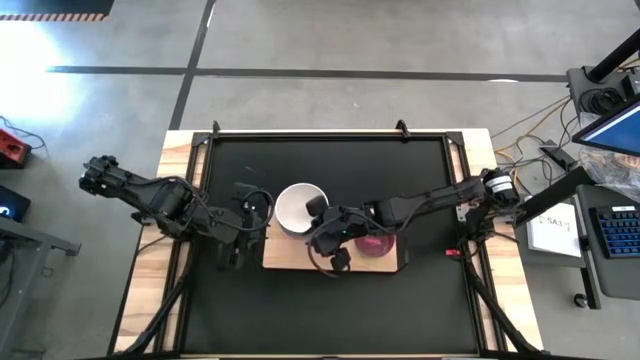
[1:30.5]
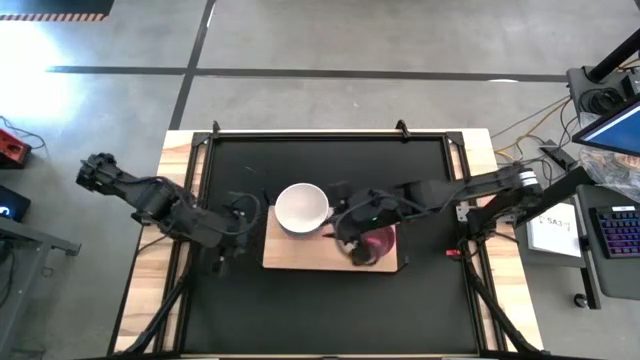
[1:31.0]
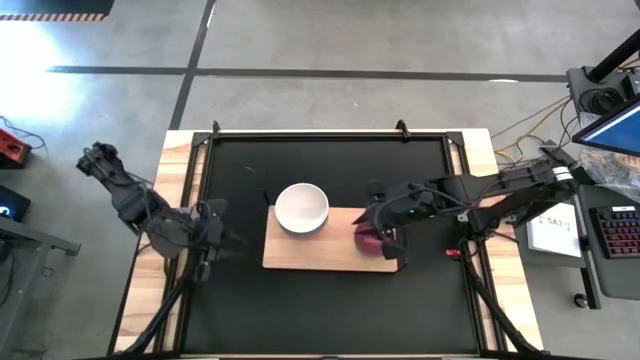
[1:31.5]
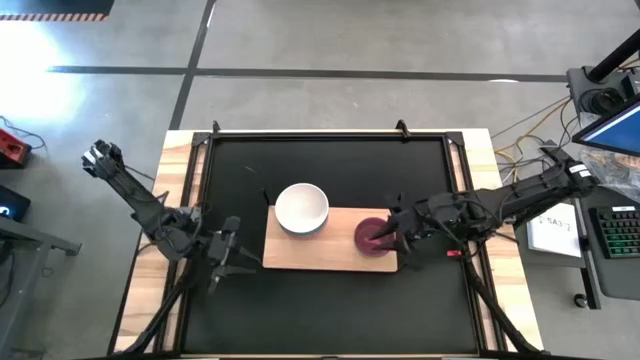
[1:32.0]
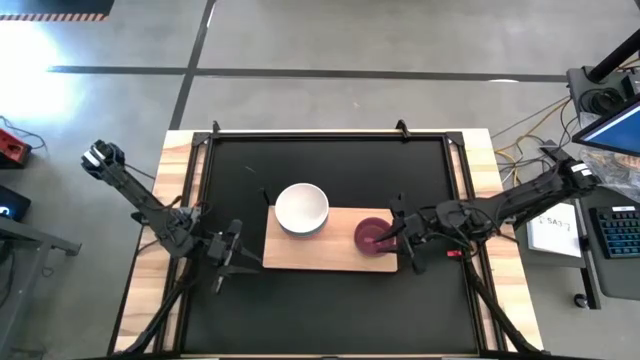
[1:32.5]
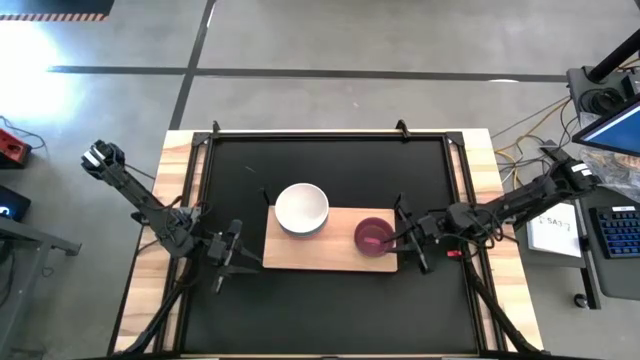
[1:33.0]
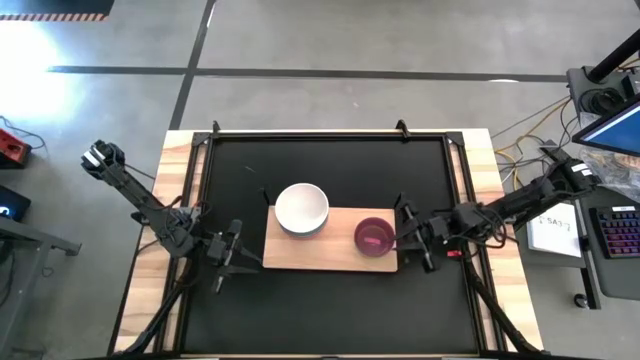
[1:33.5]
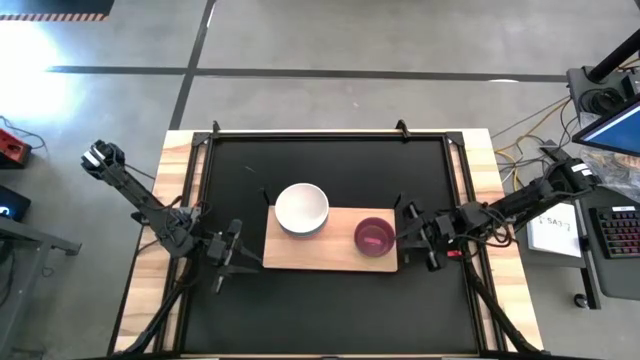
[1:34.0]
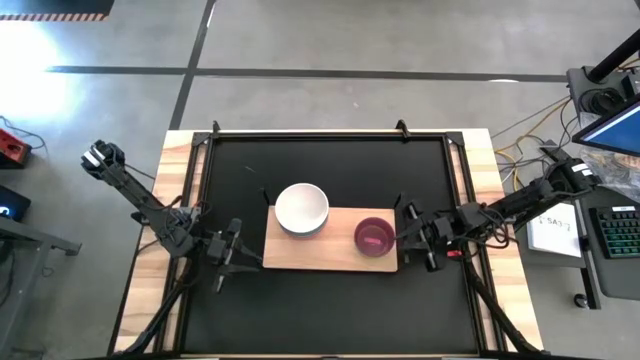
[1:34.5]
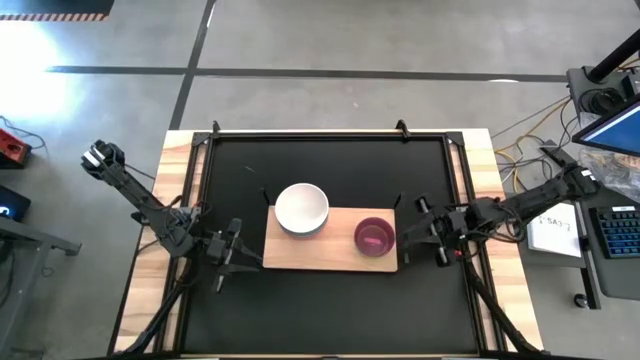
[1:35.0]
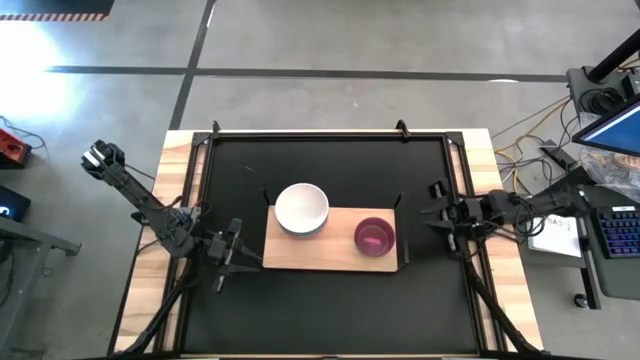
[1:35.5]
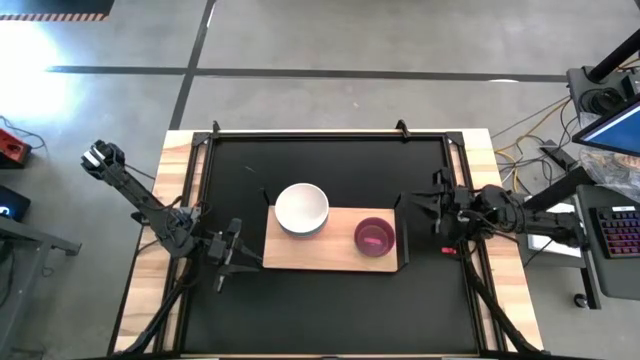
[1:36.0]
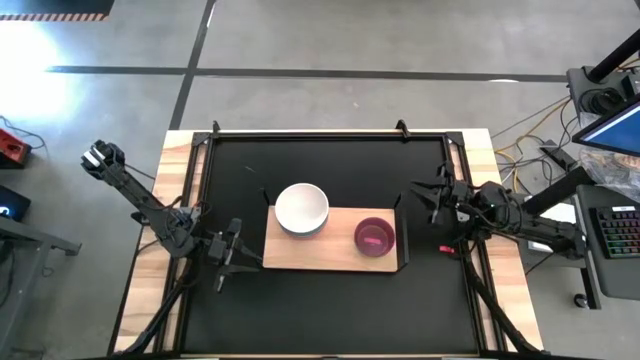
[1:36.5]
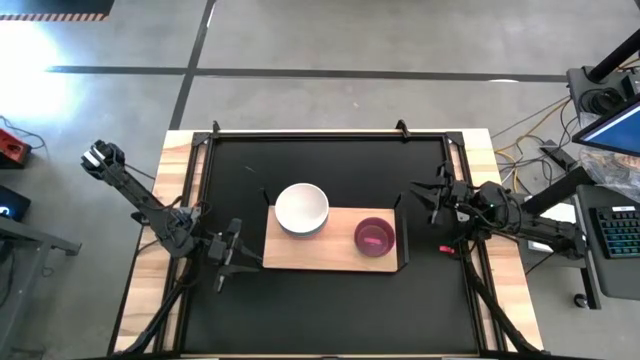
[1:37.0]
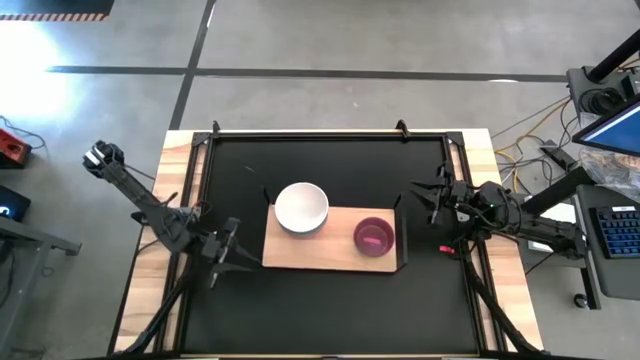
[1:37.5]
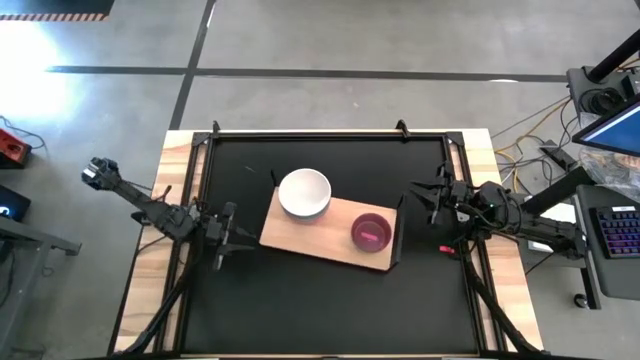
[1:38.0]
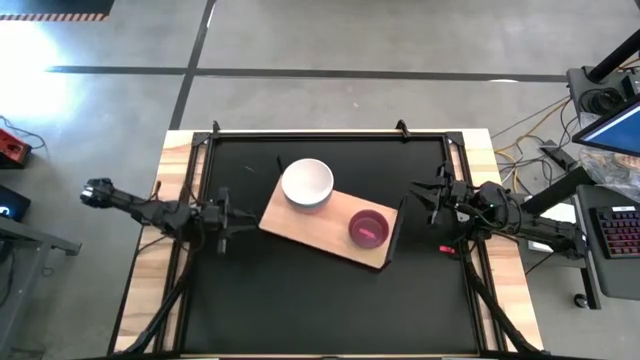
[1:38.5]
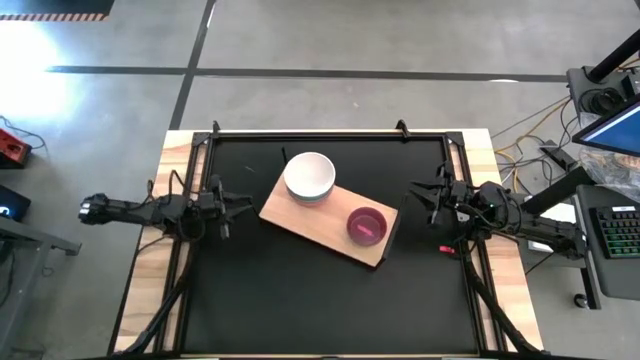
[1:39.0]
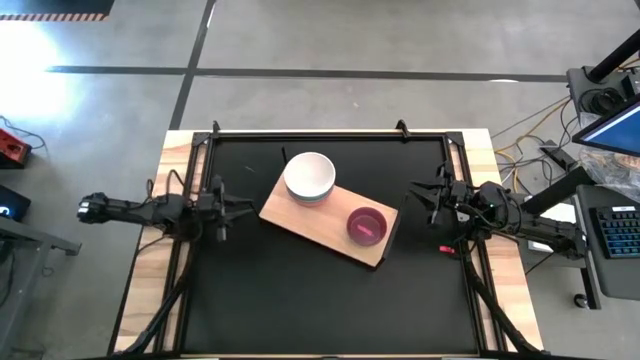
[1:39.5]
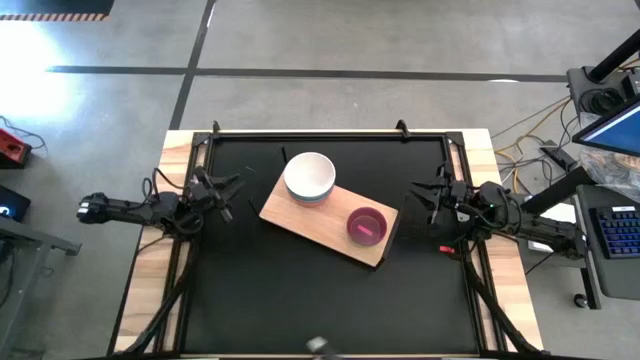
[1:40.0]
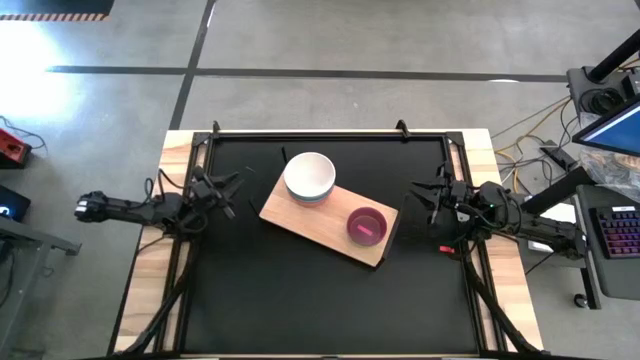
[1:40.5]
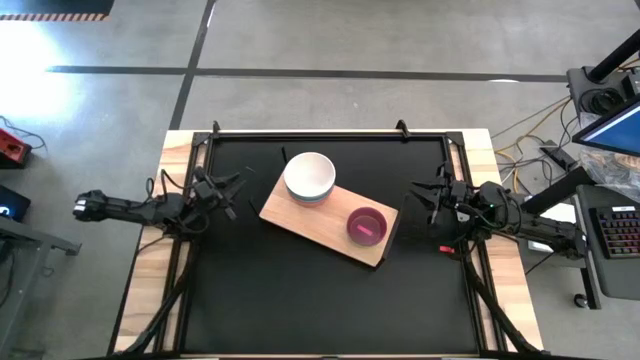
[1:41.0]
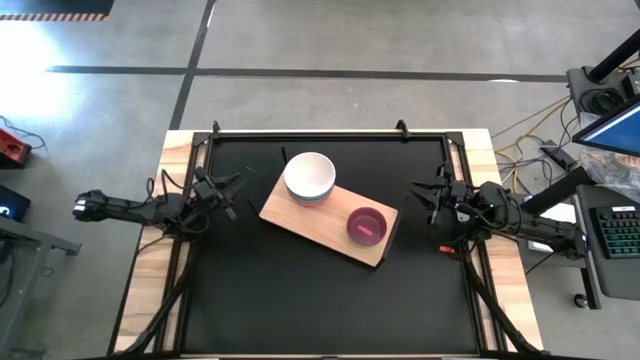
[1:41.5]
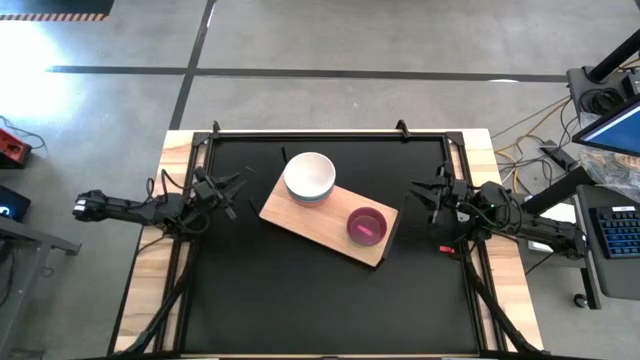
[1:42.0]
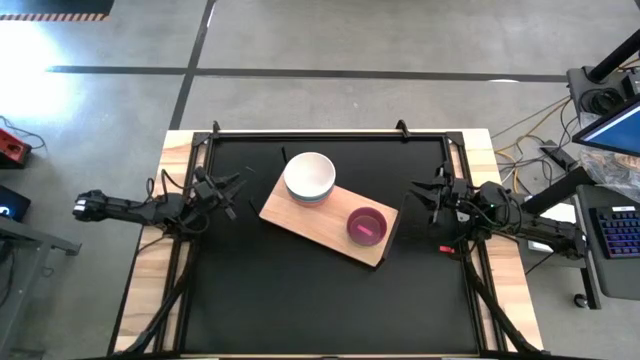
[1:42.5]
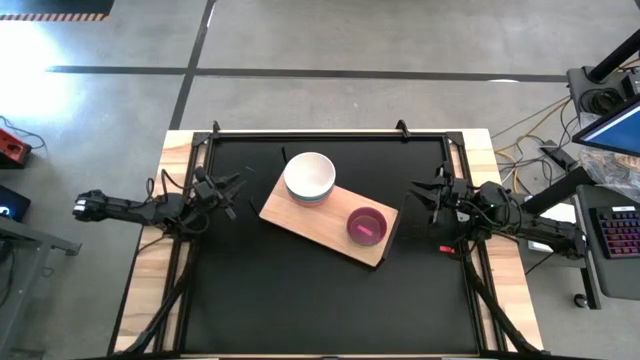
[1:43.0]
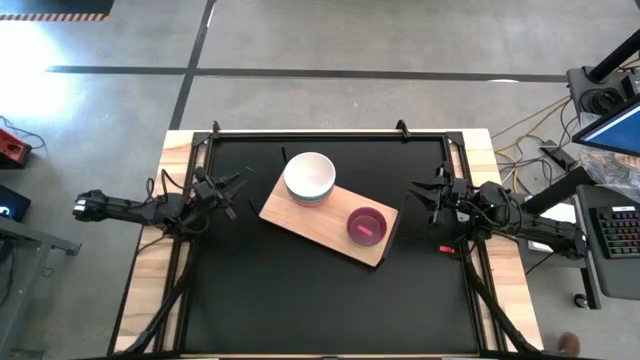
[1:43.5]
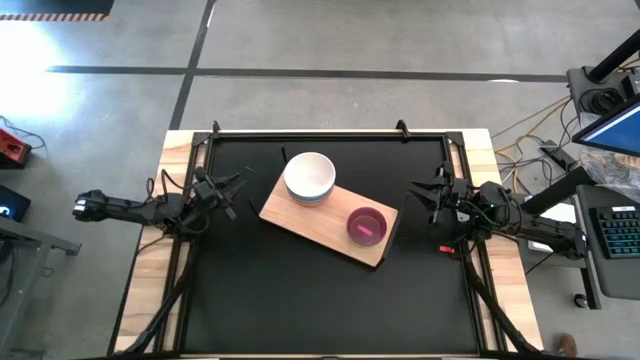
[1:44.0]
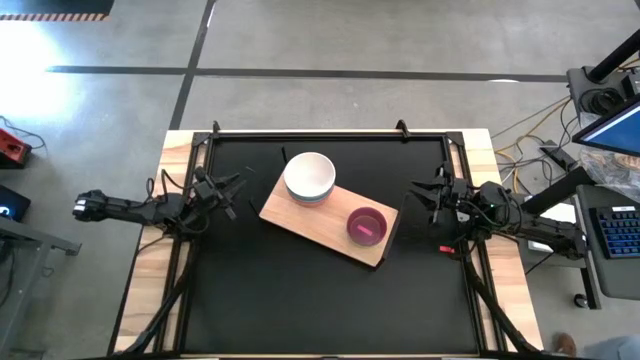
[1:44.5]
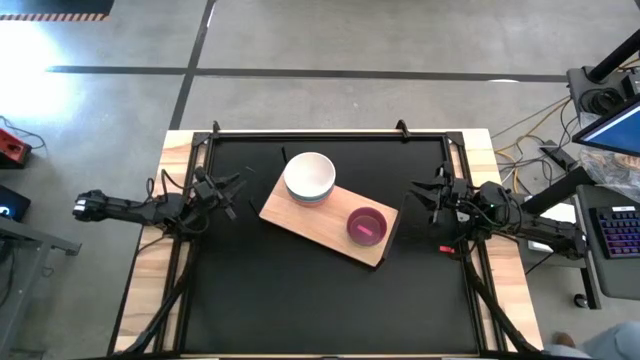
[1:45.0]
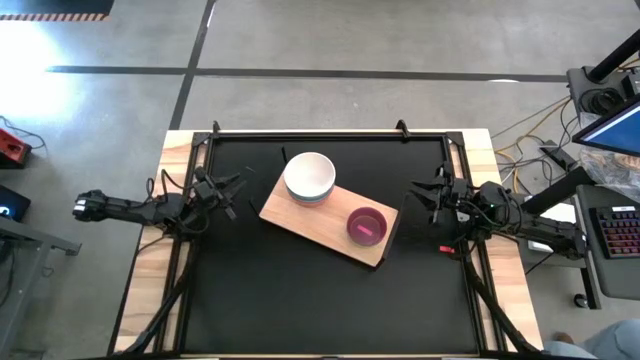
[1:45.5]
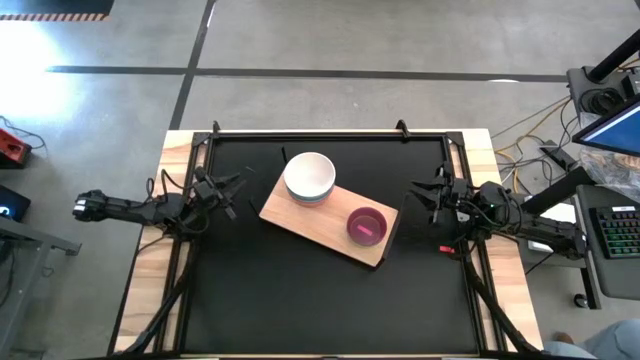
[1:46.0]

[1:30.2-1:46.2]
Task: Place and stack bowls onto a shelf
Return to Home Position

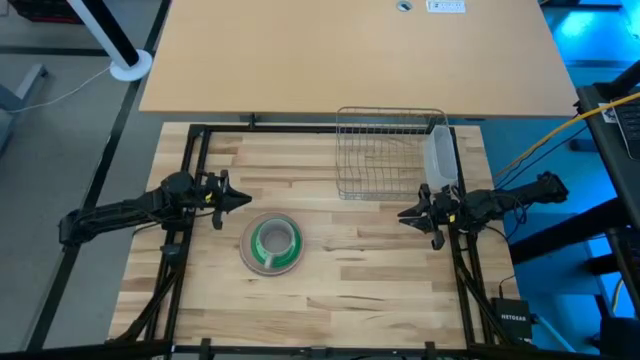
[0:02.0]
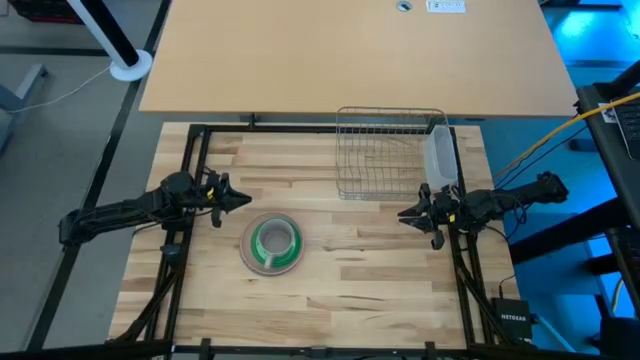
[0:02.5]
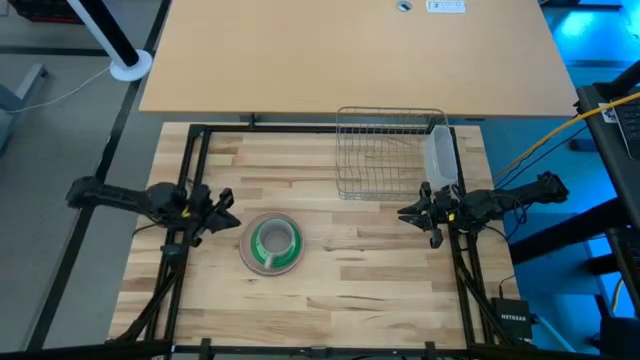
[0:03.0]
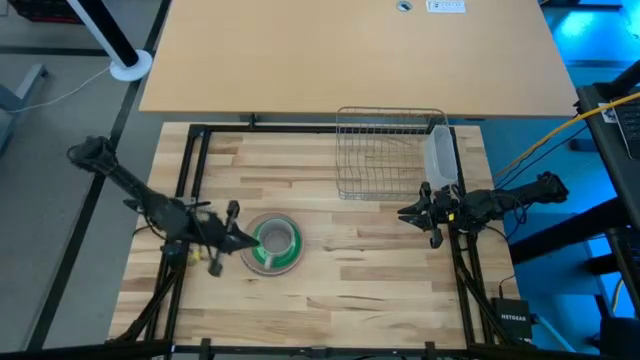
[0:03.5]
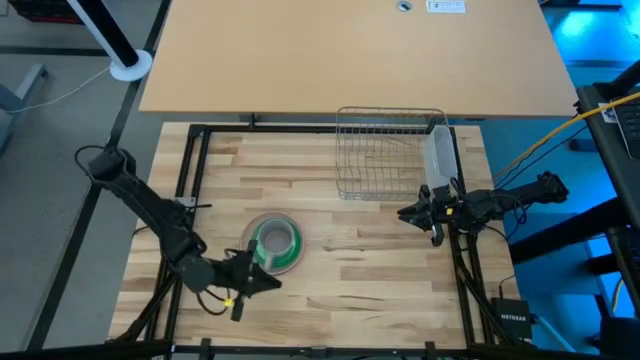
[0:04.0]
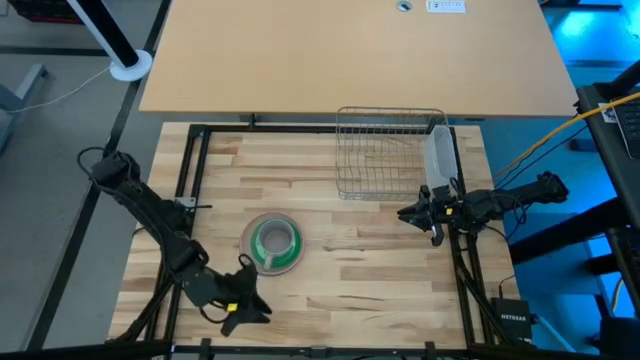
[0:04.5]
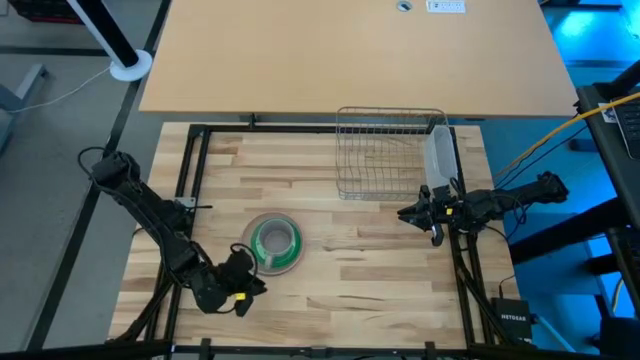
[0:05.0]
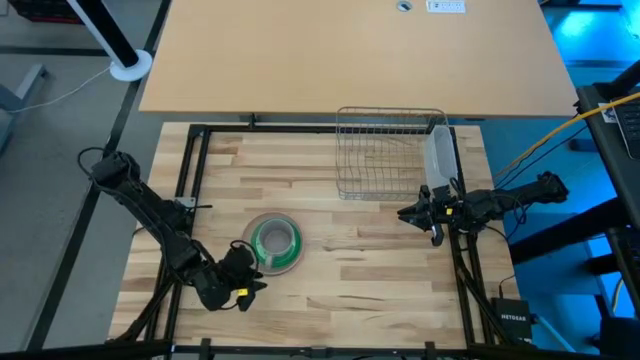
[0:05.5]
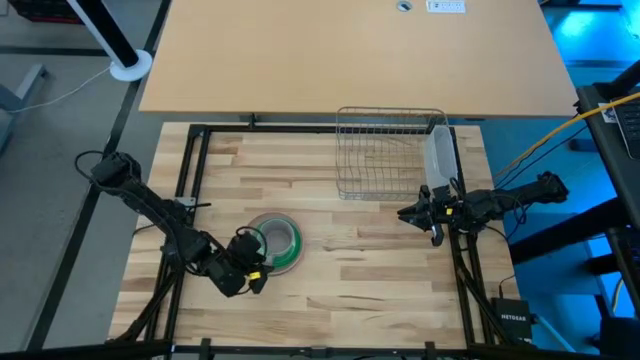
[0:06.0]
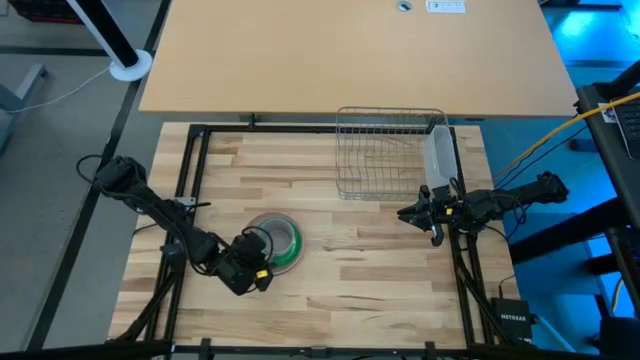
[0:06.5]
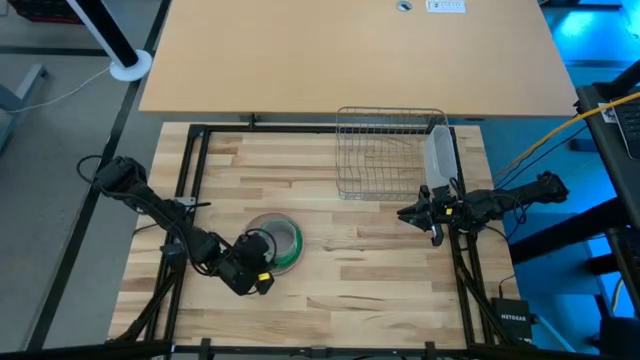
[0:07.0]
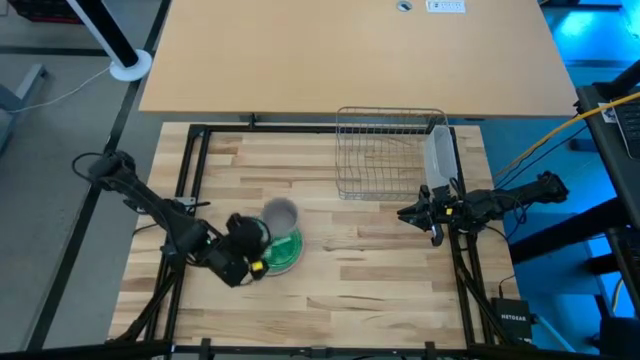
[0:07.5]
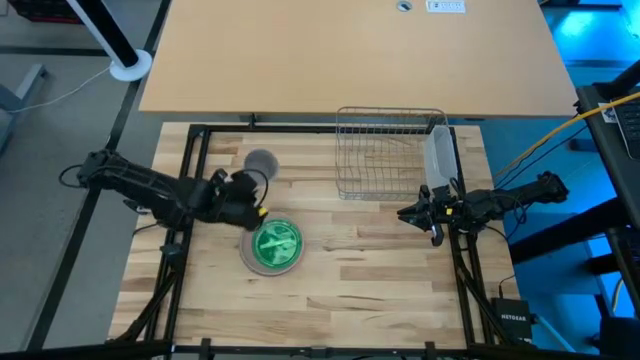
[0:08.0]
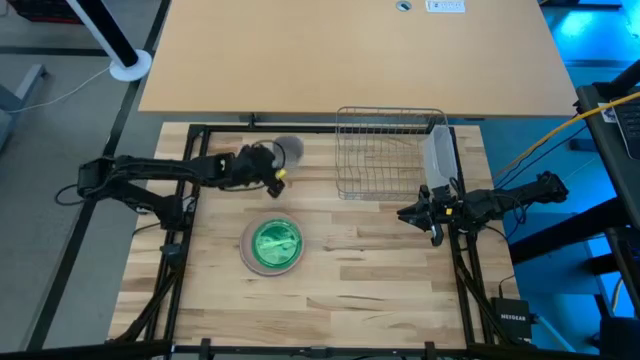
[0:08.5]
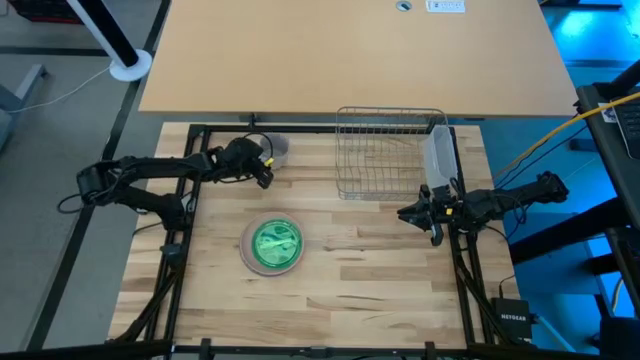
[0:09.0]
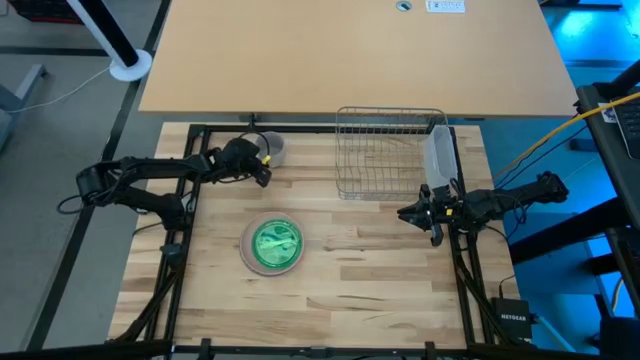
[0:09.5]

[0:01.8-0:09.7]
Task: Sort dishes
Move the gray mug to the top
